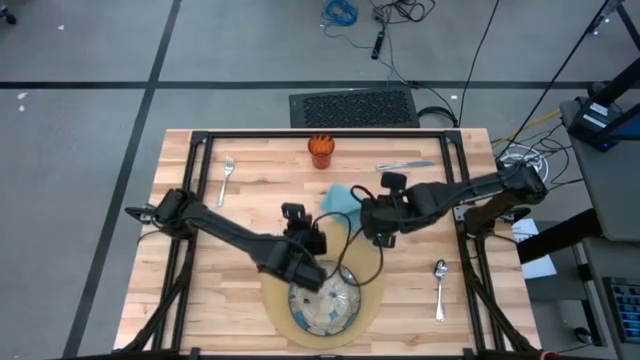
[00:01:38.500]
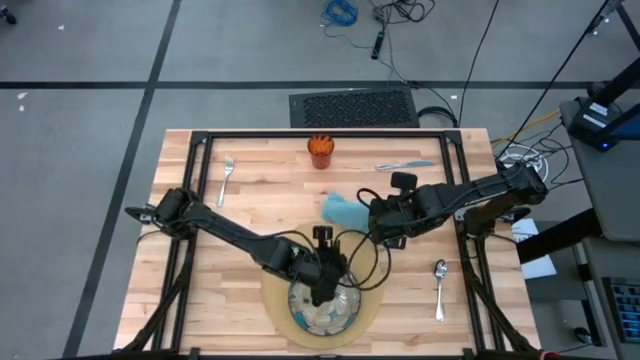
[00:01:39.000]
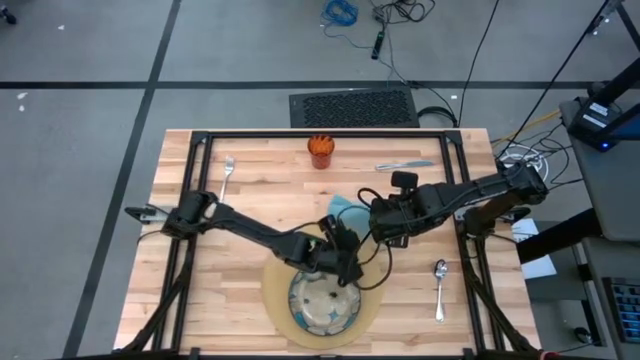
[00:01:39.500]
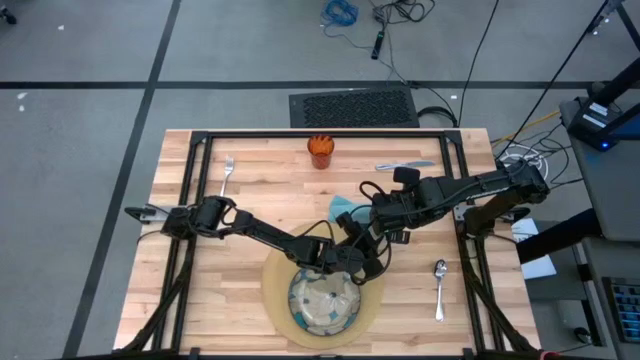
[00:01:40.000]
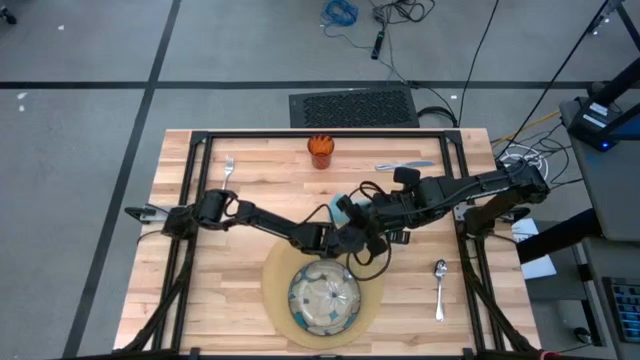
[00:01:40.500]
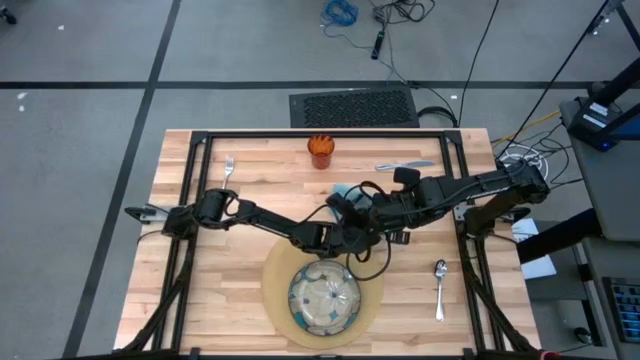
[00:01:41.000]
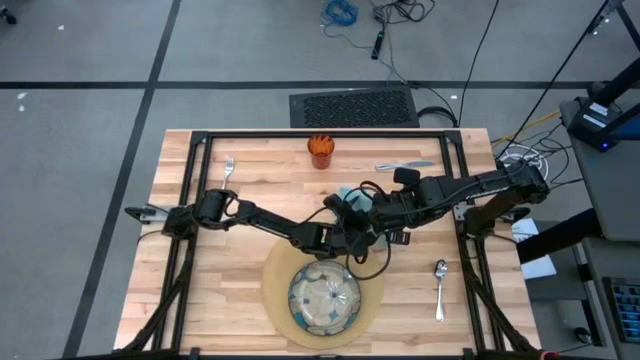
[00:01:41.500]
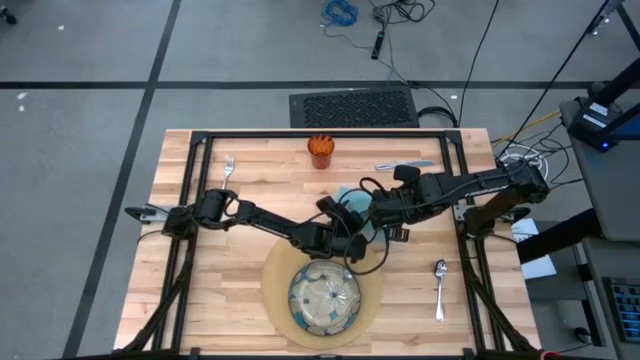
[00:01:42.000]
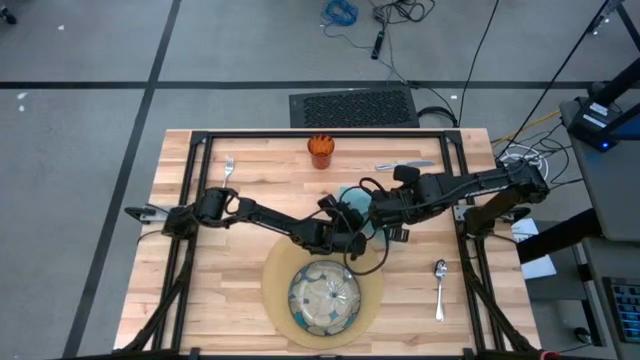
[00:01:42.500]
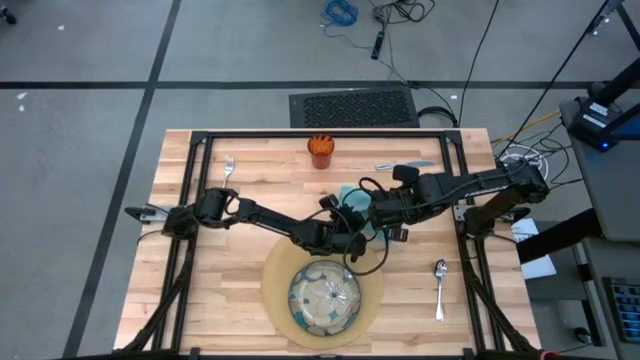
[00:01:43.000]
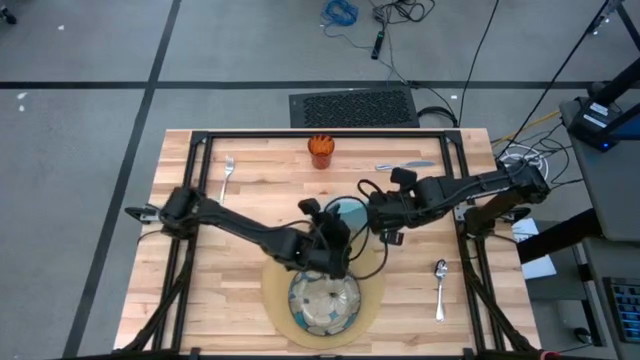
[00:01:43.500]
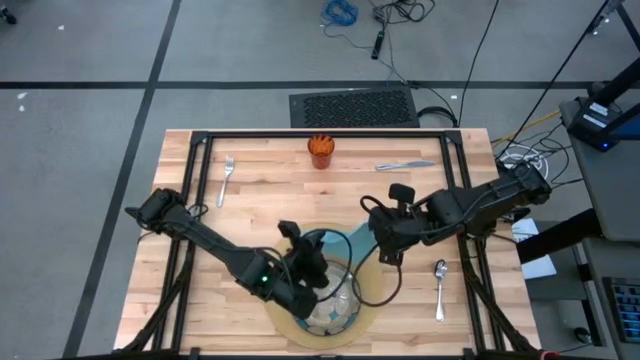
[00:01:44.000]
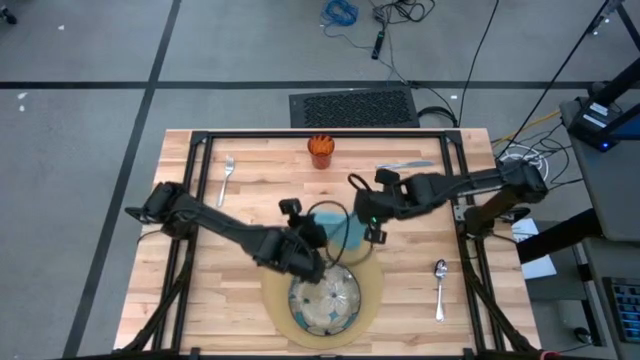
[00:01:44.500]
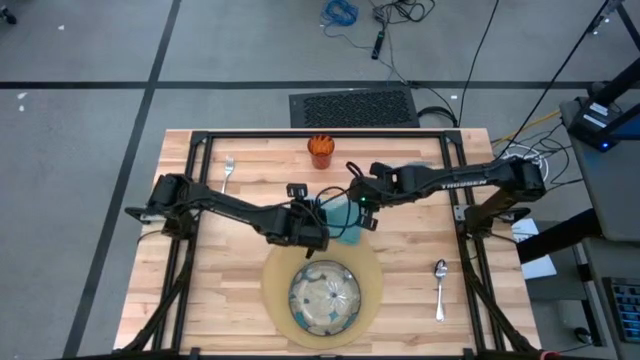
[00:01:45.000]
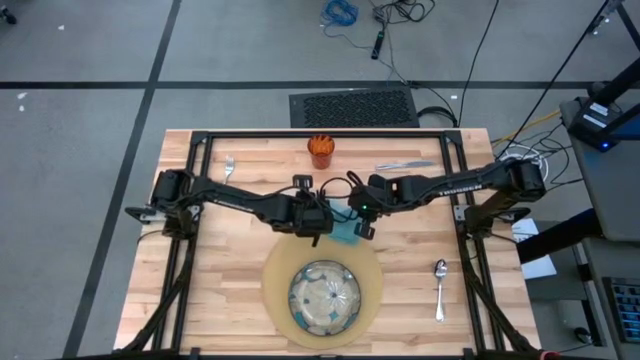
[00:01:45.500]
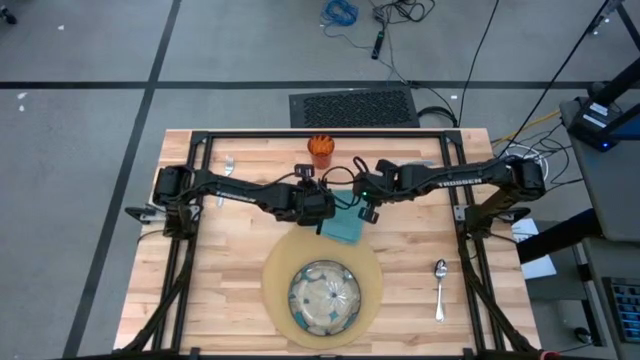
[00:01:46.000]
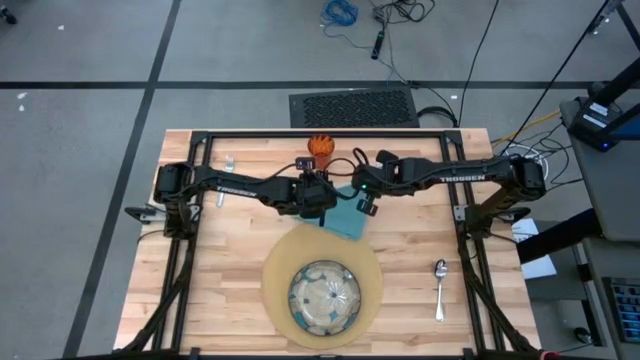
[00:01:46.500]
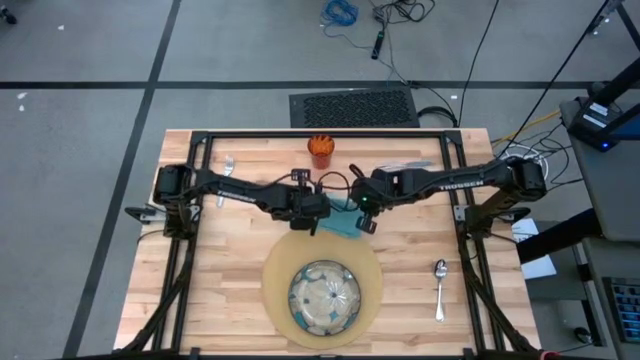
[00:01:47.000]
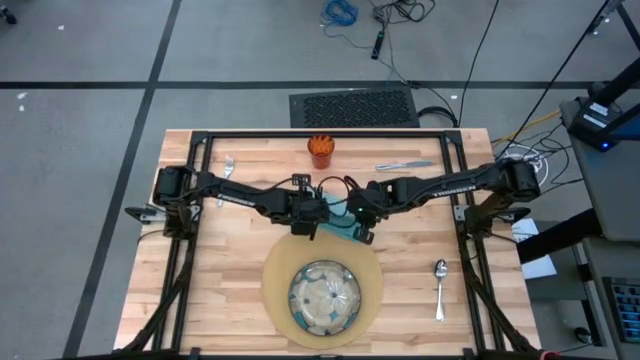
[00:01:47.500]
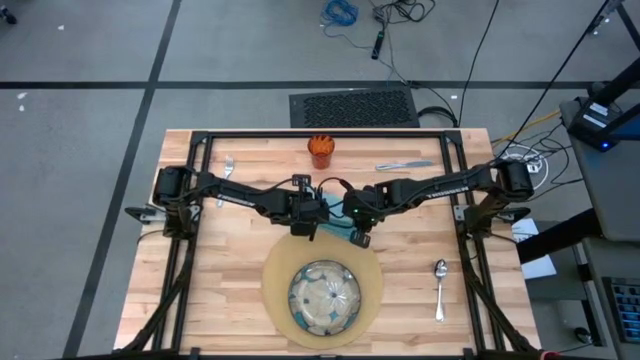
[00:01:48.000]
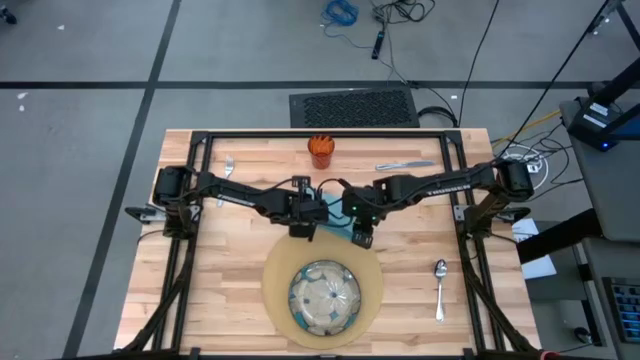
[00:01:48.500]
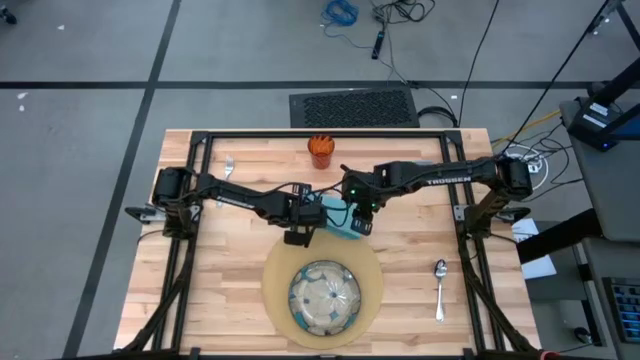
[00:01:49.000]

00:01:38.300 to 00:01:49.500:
Task: Set table place
Fold the blue table napkin

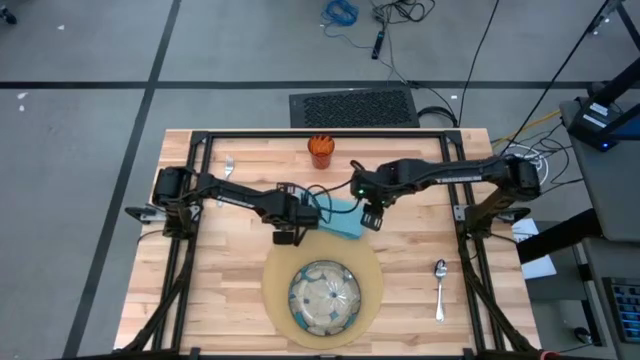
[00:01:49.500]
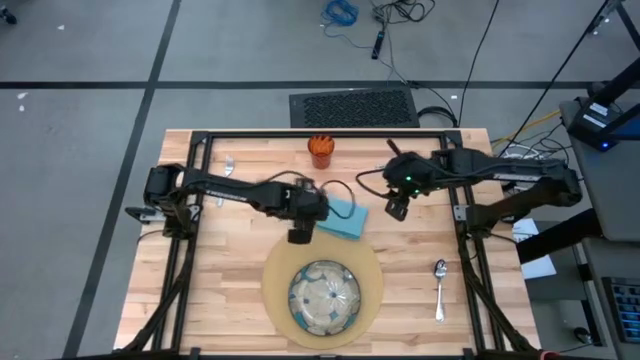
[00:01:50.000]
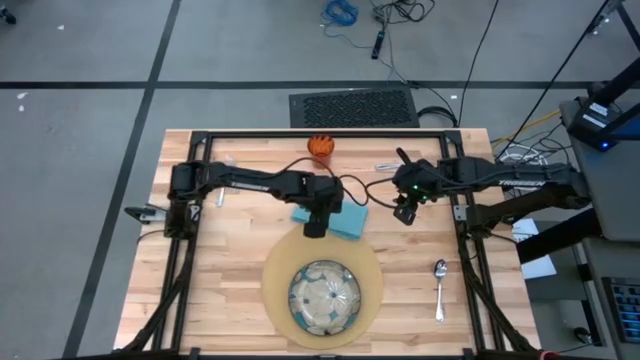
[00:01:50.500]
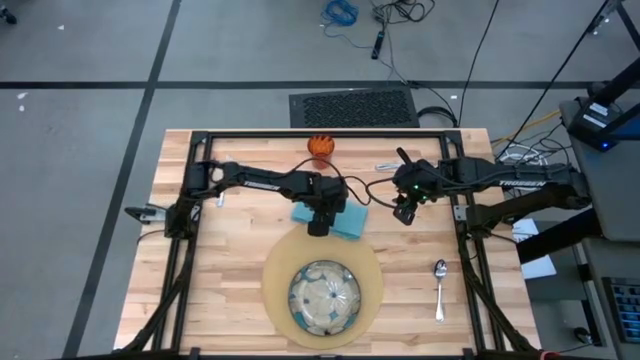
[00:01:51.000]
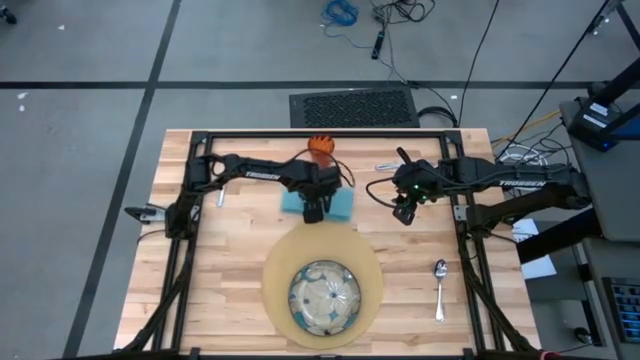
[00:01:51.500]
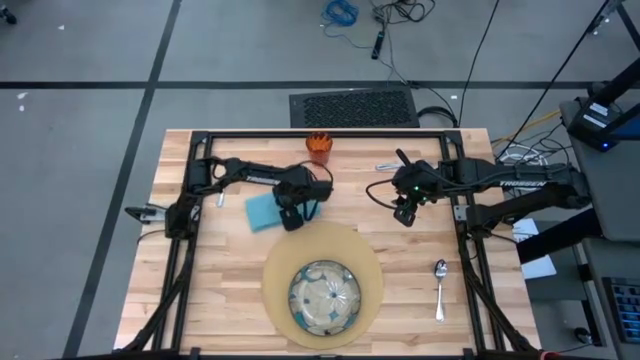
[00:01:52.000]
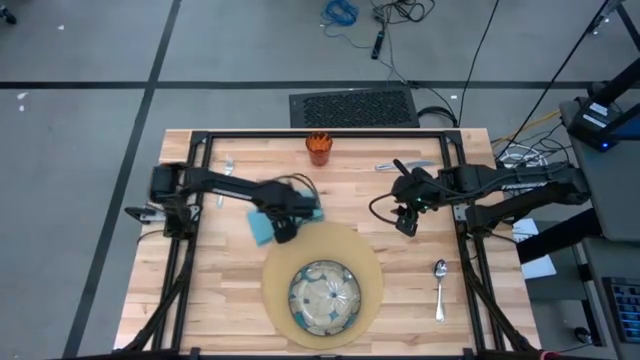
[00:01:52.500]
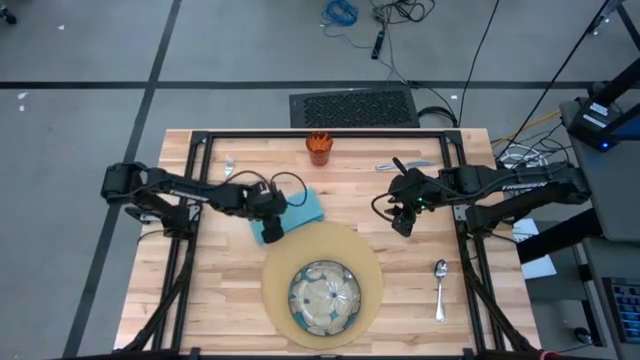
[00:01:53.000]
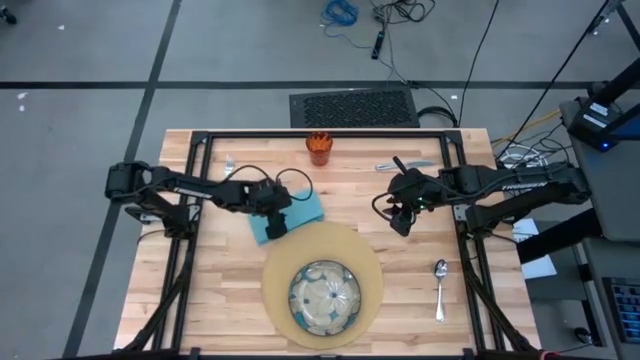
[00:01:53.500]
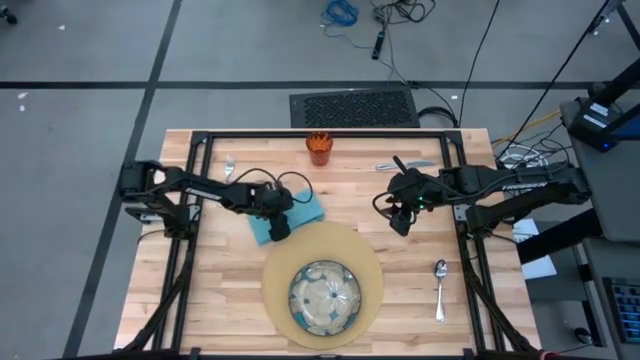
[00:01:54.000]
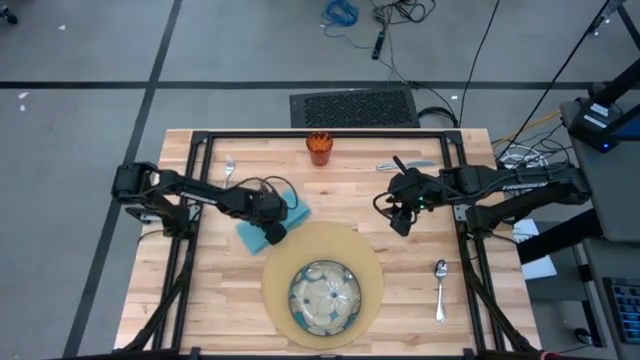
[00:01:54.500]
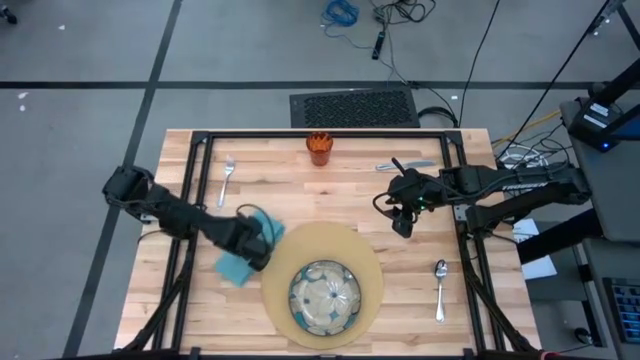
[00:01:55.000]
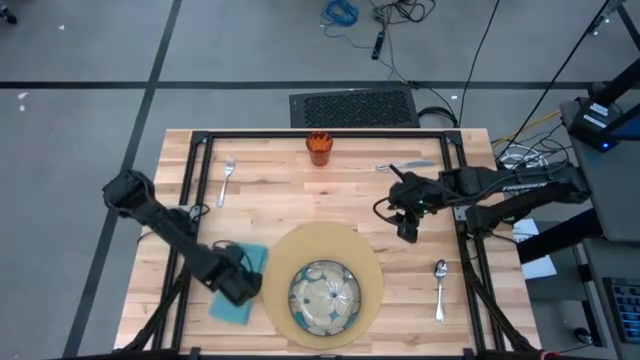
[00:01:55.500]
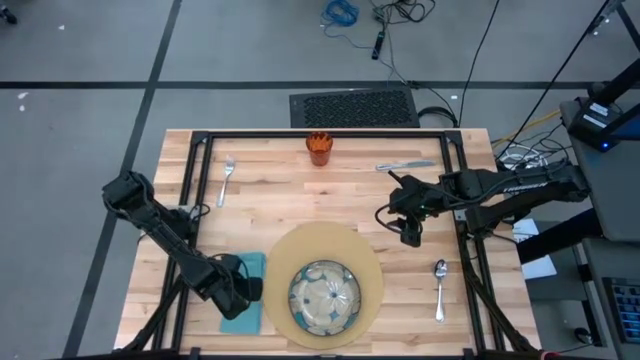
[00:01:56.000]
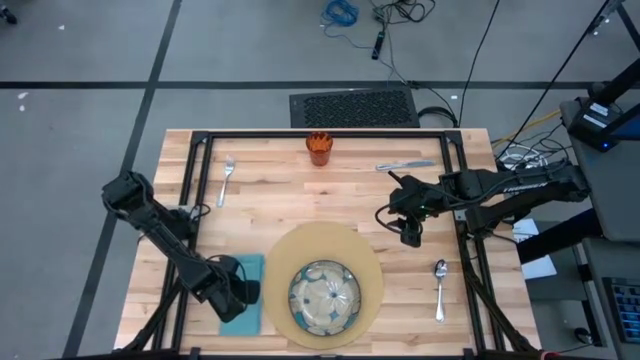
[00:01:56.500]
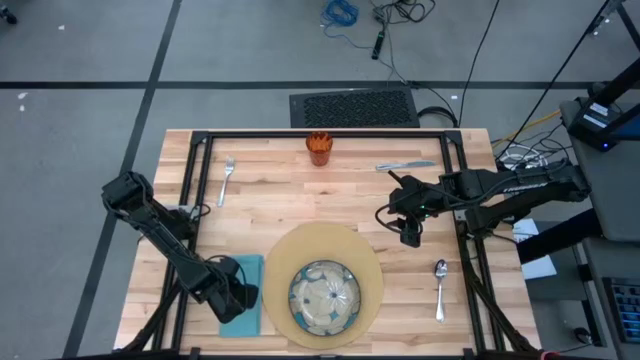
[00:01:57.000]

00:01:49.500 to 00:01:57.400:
Move the blue table napkin to the middle left of the table

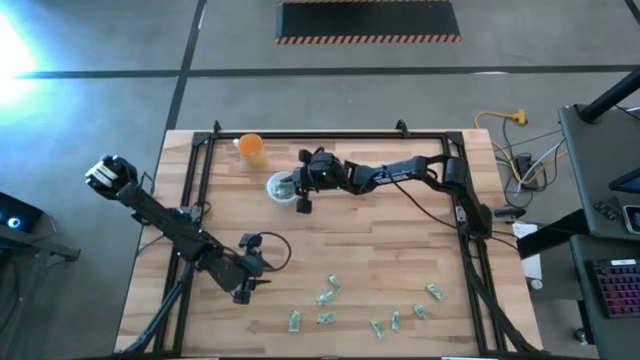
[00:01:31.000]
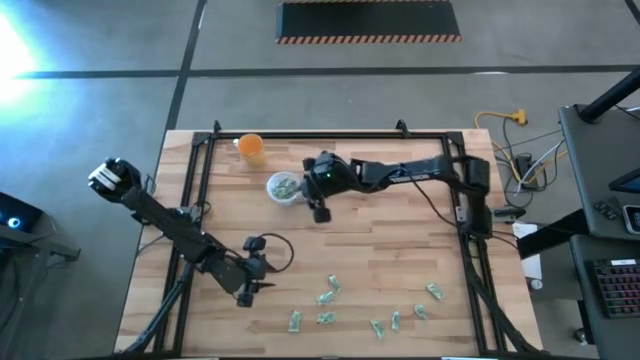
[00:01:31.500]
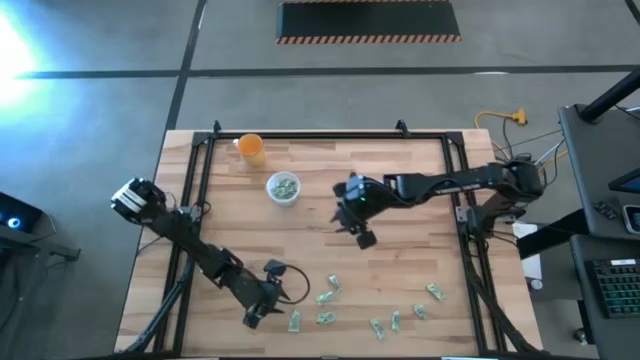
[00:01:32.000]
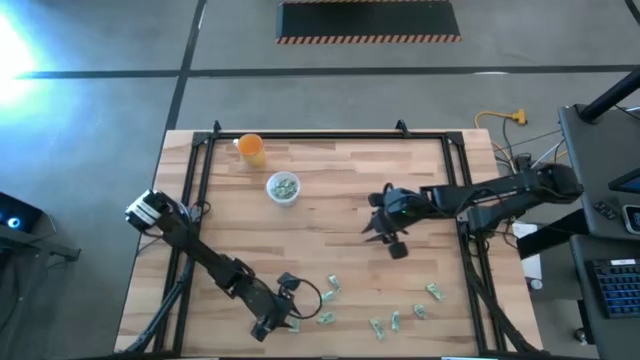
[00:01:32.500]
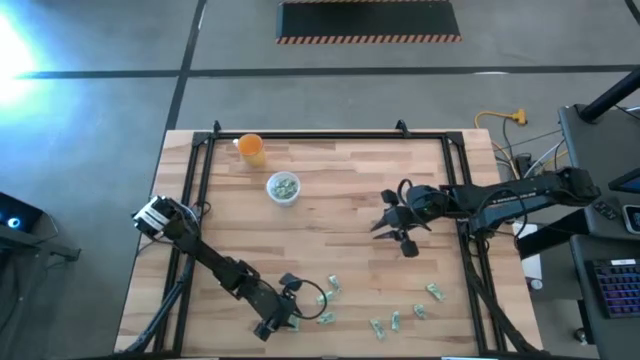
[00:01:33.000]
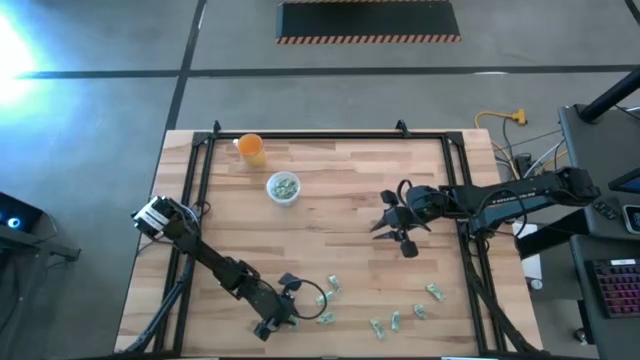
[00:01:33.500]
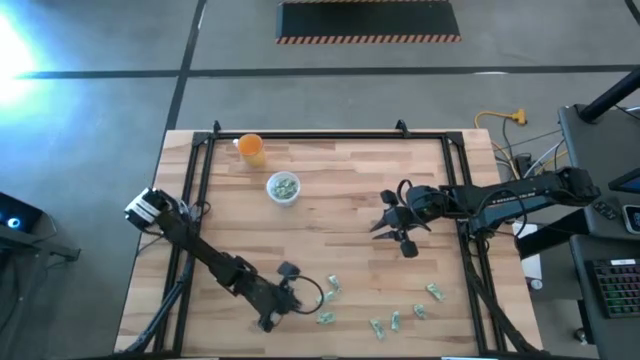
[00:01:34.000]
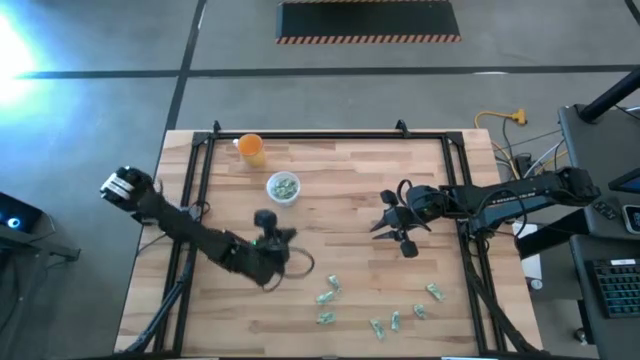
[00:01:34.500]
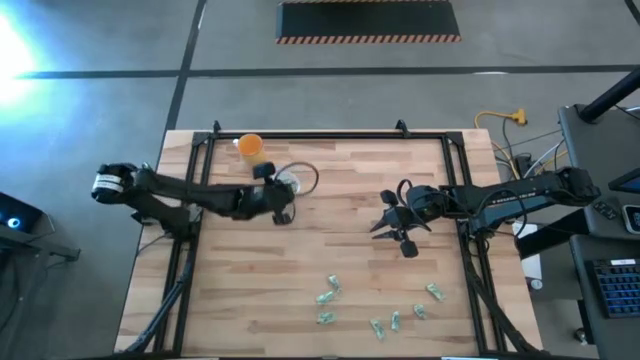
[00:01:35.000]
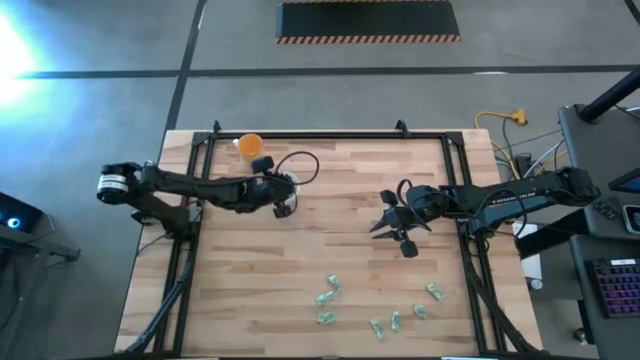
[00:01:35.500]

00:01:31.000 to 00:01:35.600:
Task: Pick and place Stevia / Truvia into bins
Put the stevia packet into the transparent container
